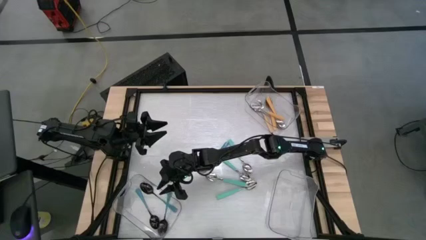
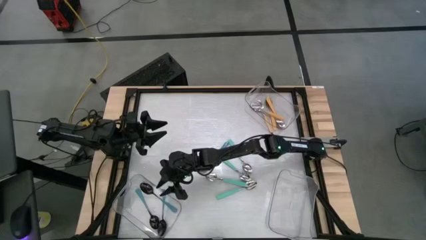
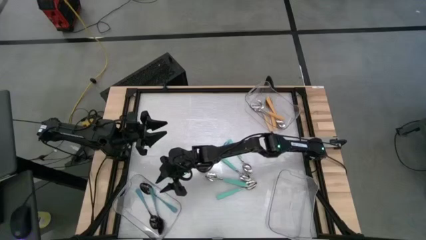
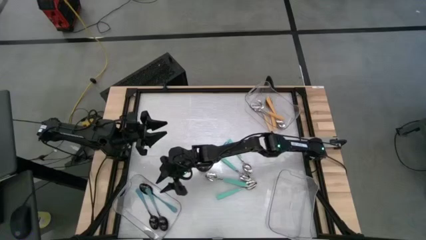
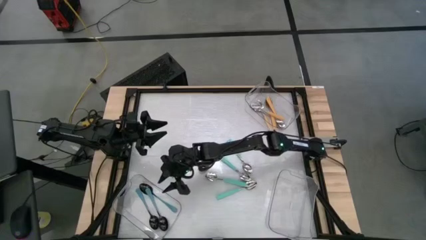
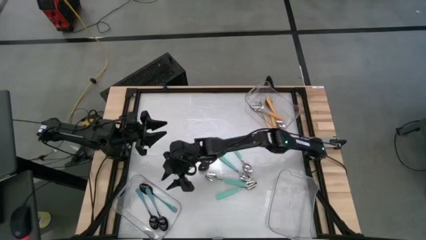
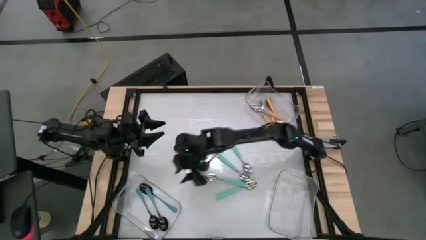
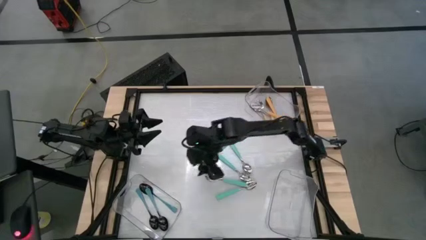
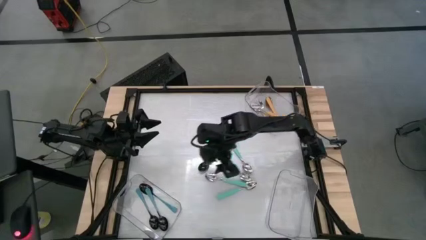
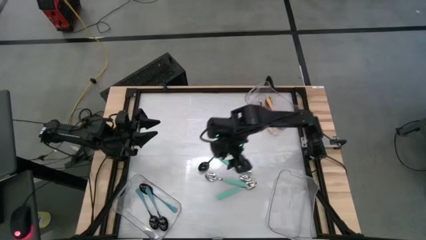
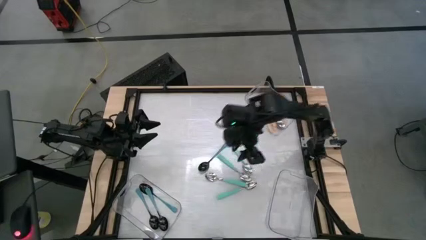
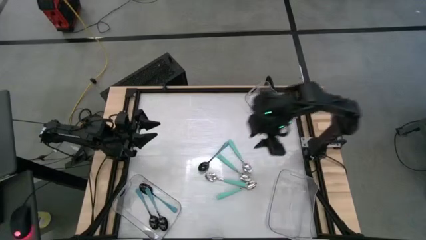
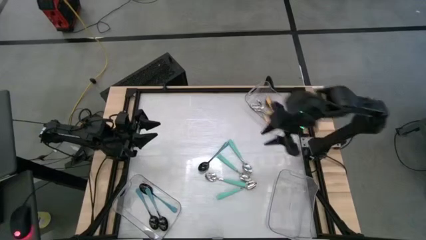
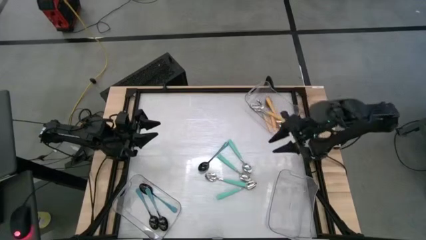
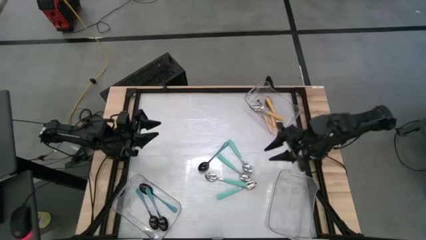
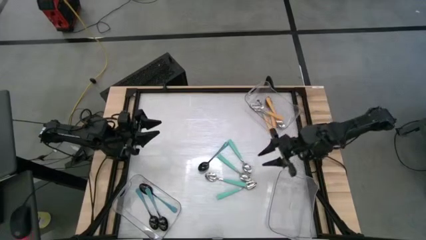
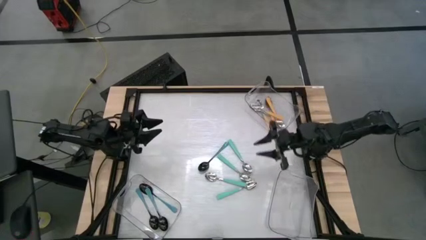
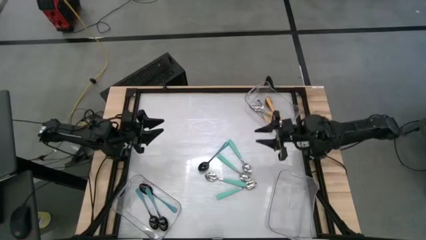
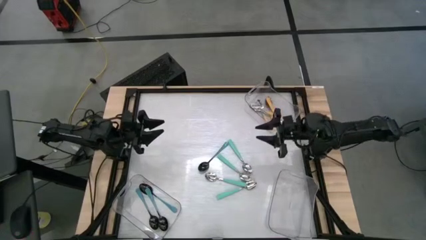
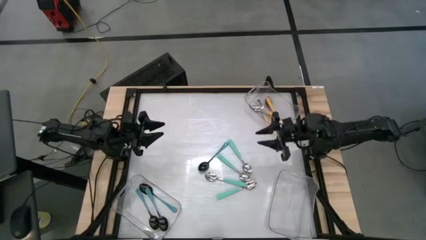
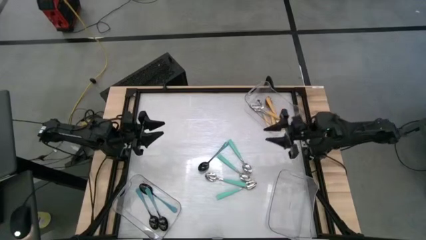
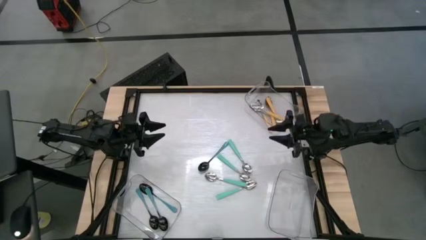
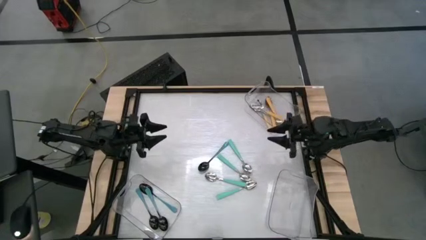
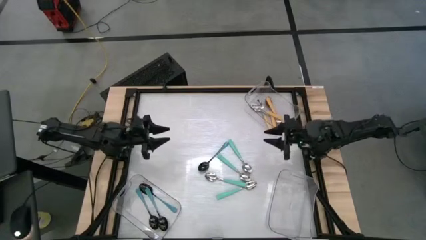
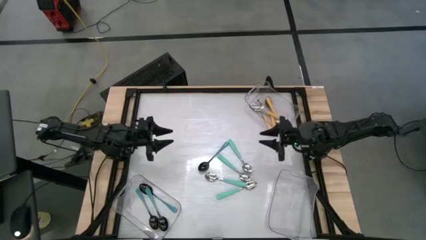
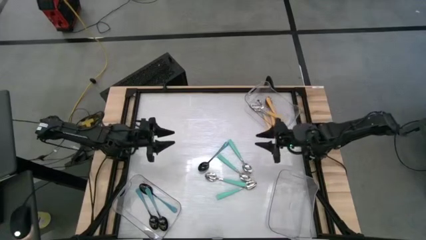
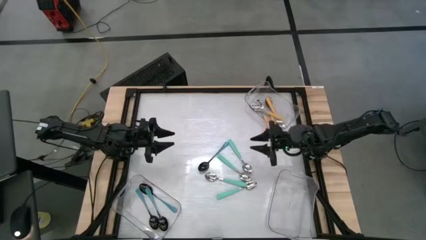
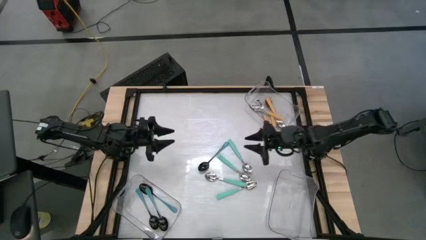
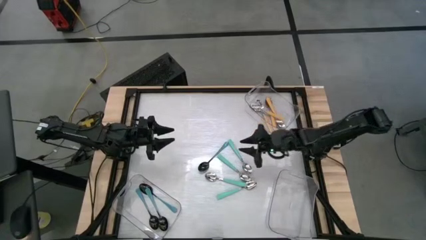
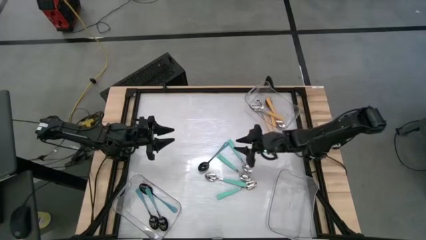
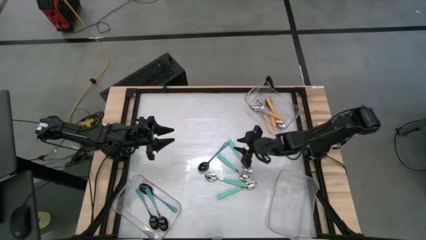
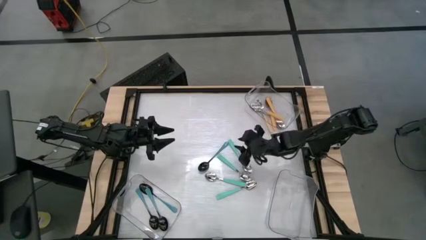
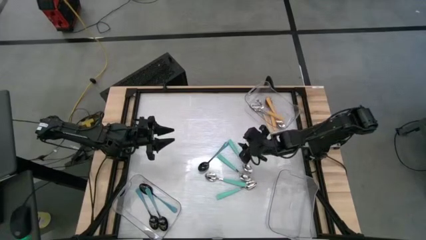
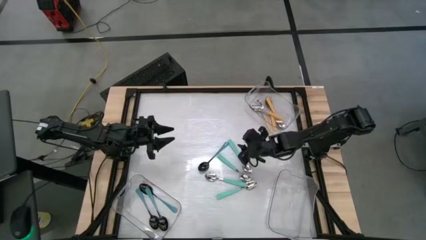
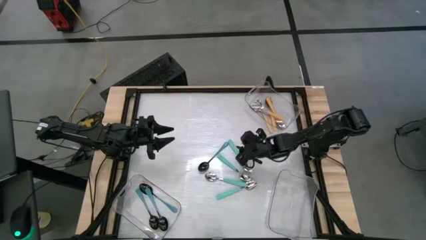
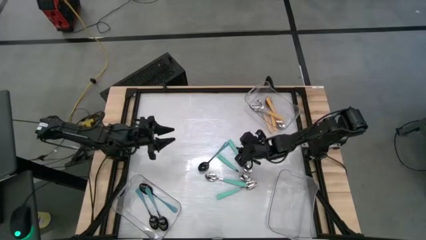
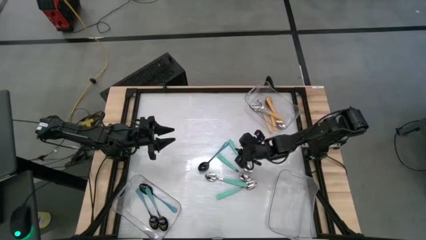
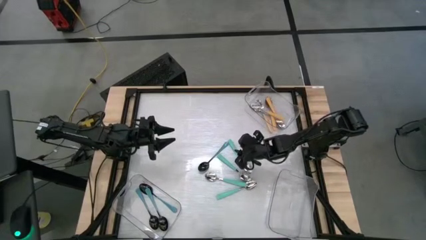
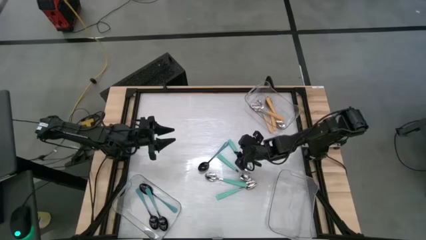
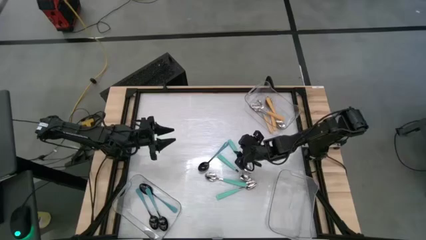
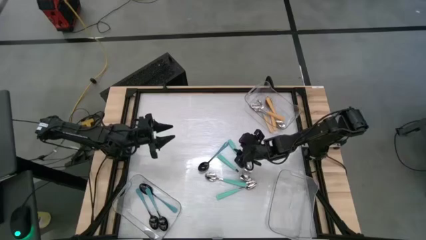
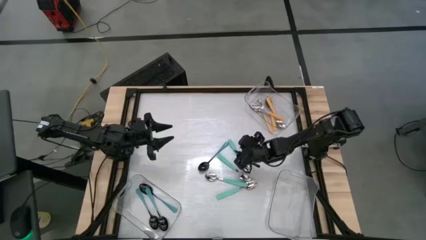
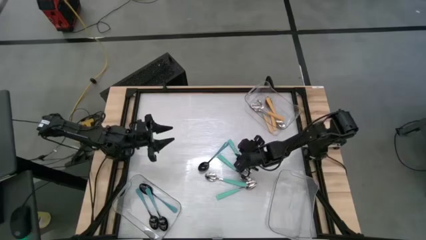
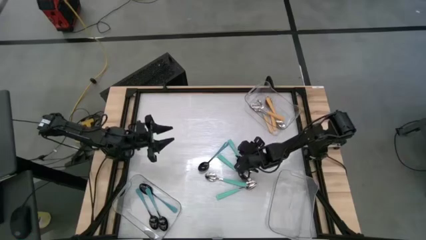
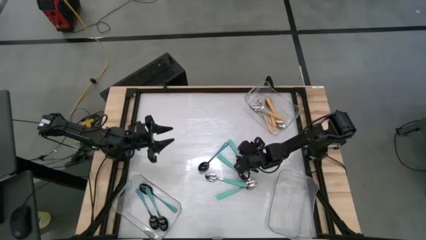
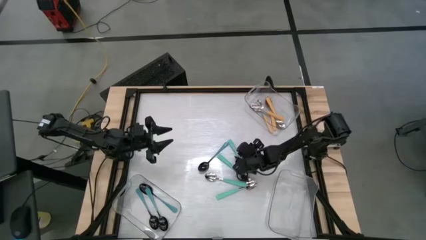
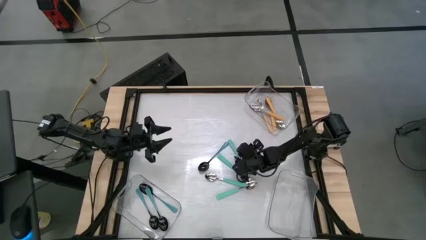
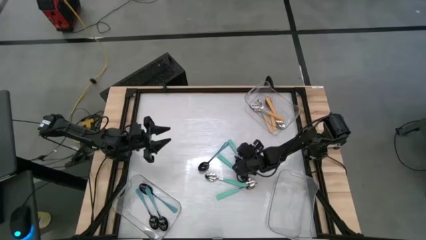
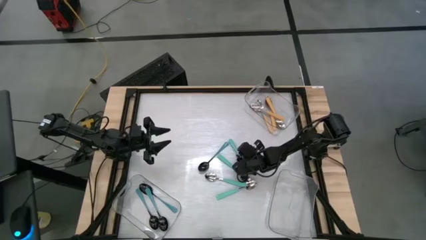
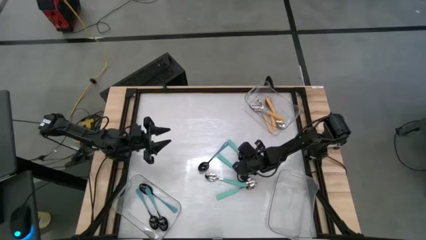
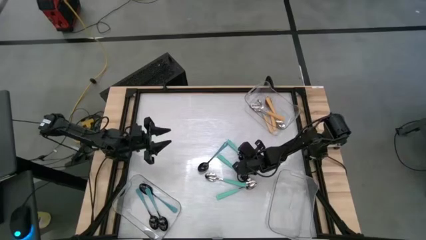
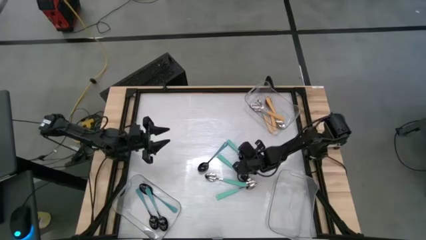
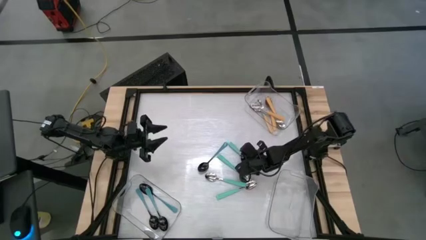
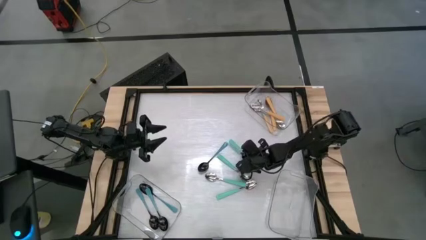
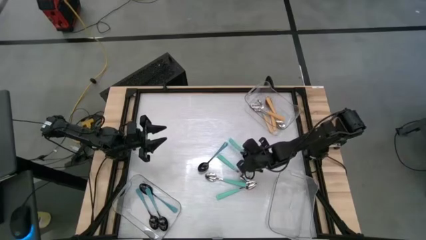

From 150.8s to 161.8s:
Task: Sort silverware by color (type)
Put the green spoon into the bottom right transparent bin

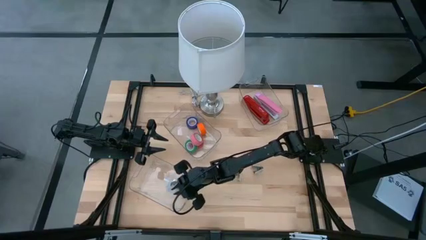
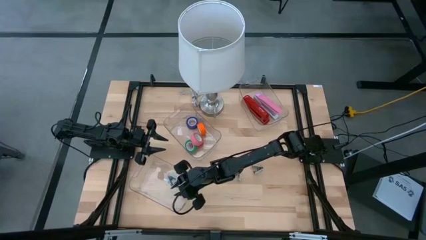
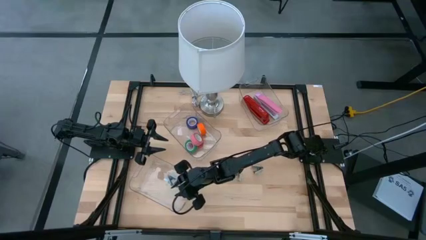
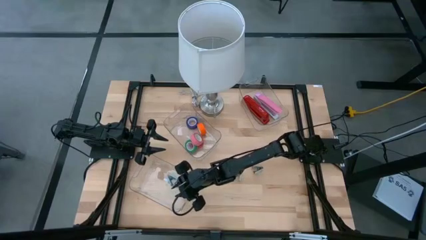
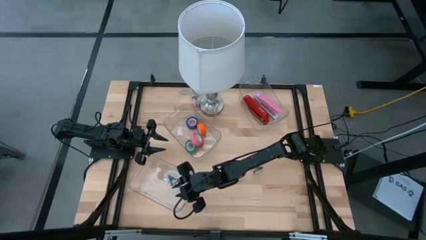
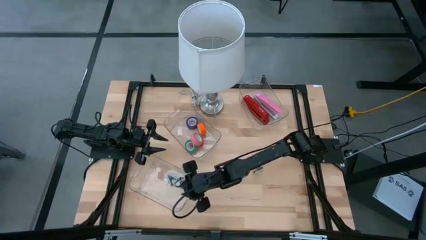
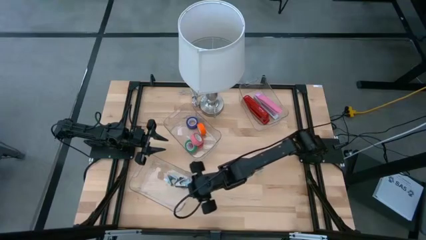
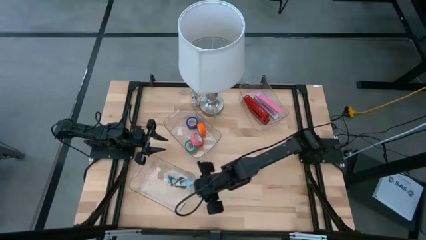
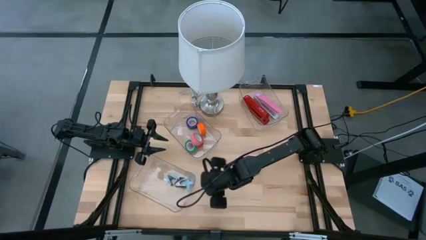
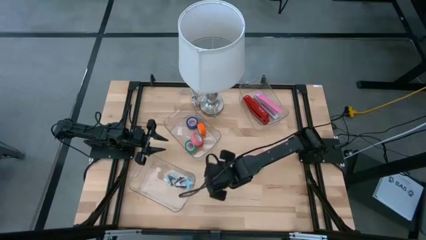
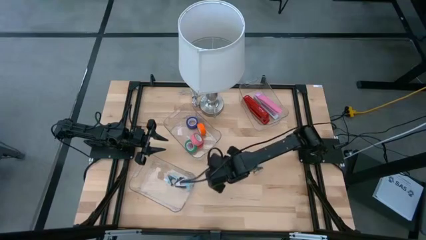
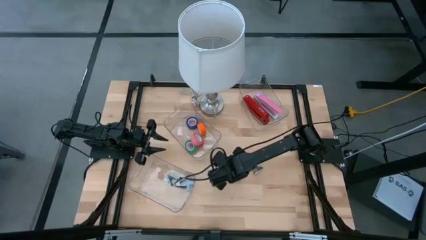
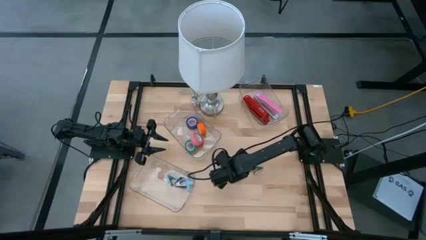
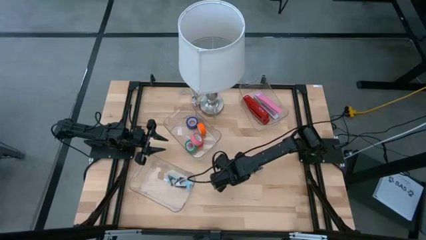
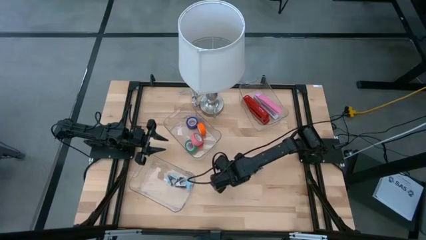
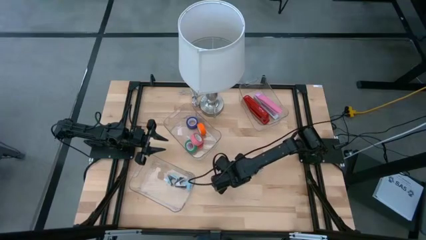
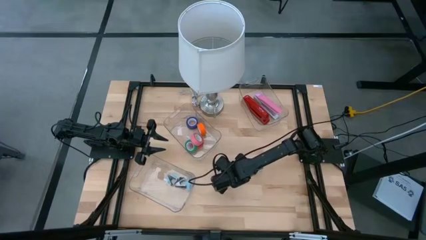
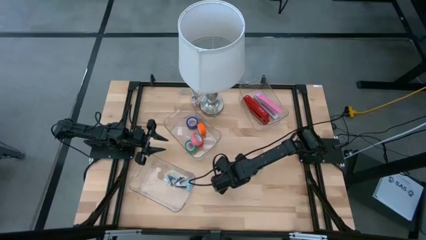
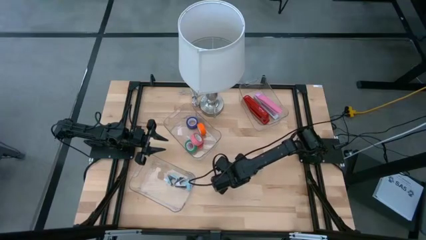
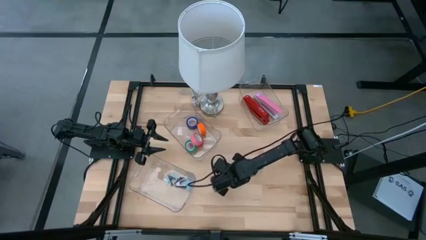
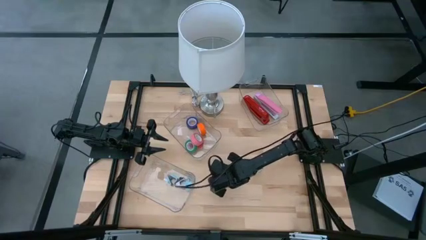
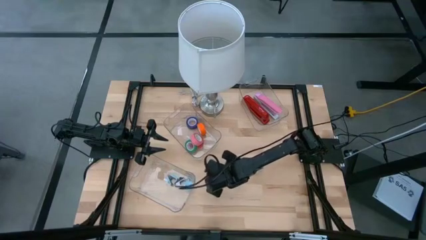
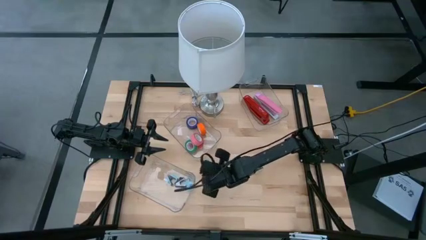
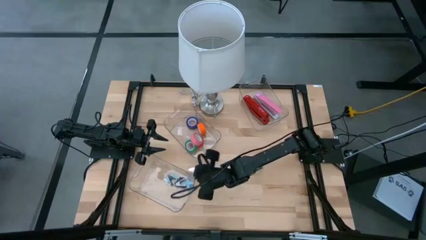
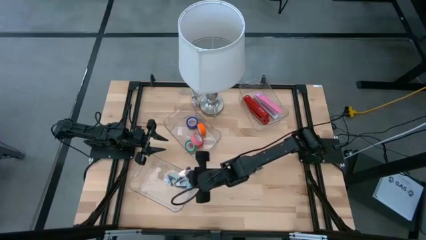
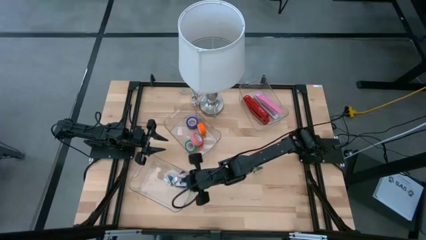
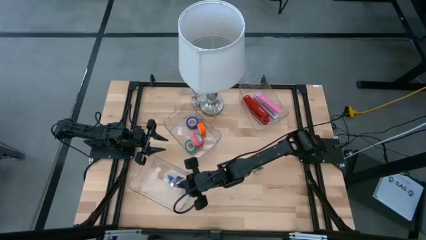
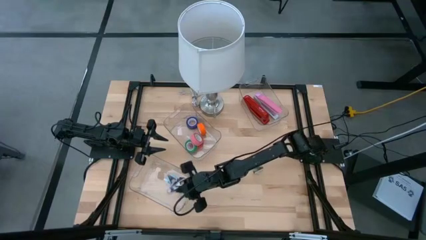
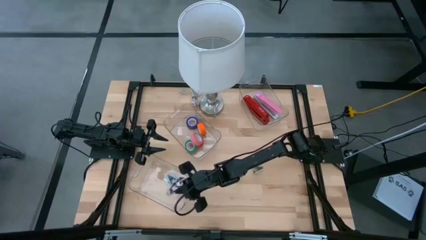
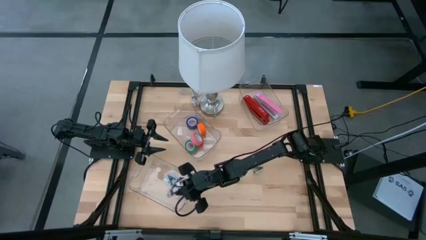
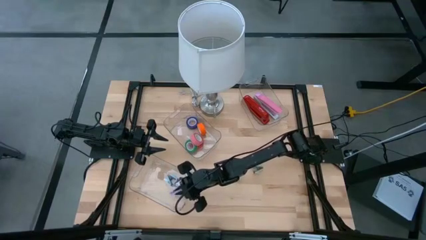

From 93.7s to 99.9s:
Task: Pick and place Stapler, Stapler remover, tape
Put the purple staple remover into the bottom transparent bin
